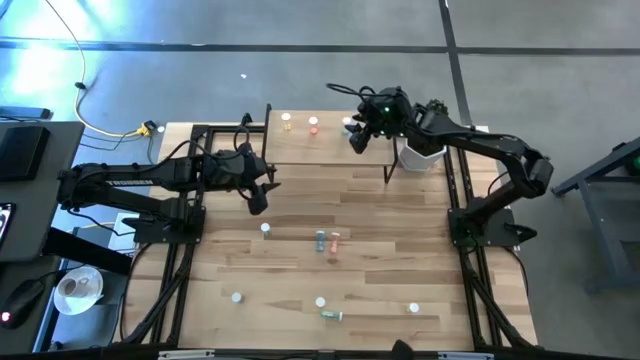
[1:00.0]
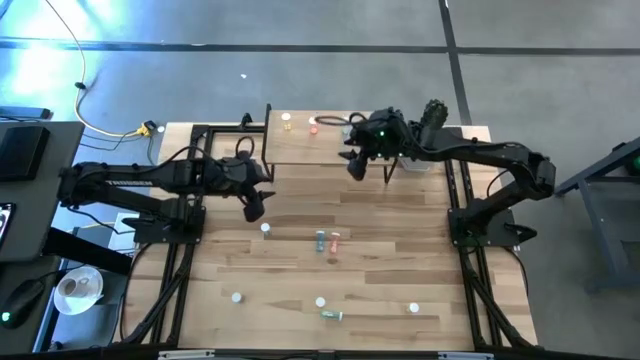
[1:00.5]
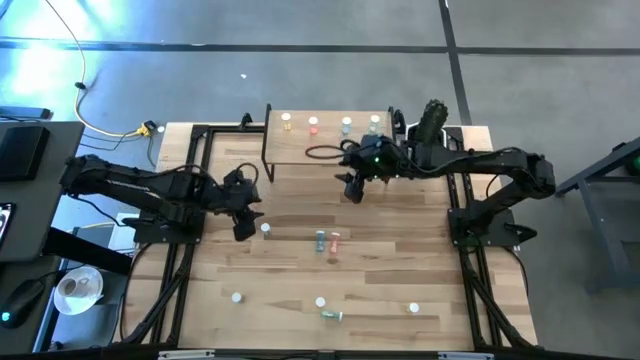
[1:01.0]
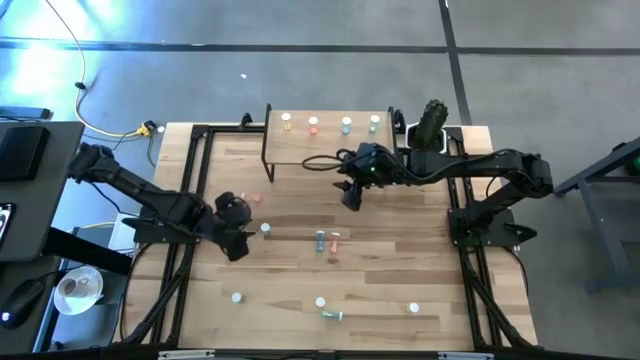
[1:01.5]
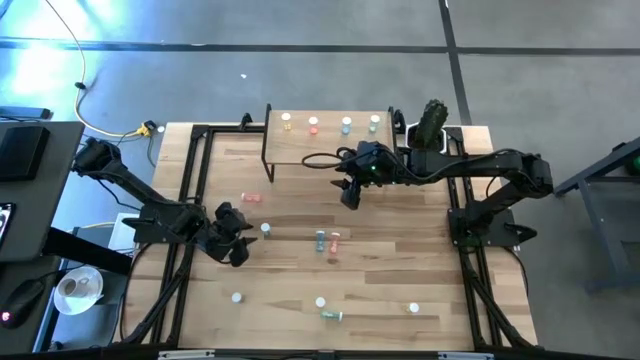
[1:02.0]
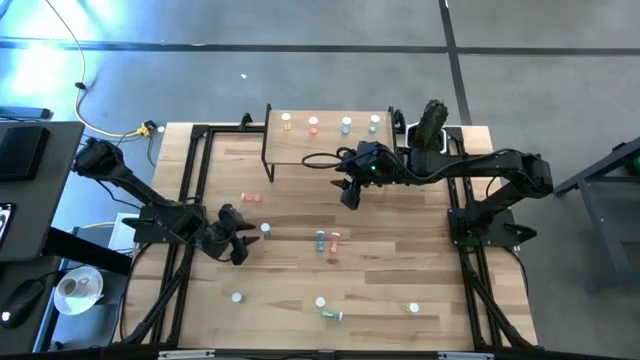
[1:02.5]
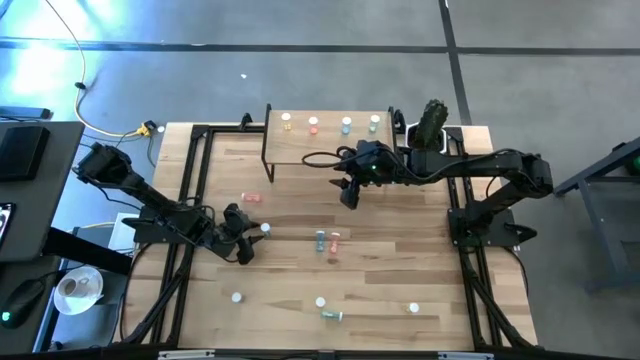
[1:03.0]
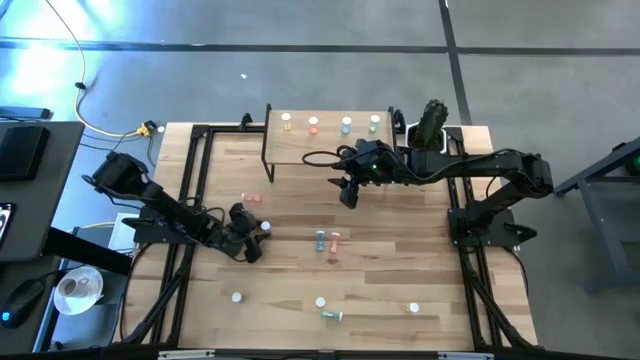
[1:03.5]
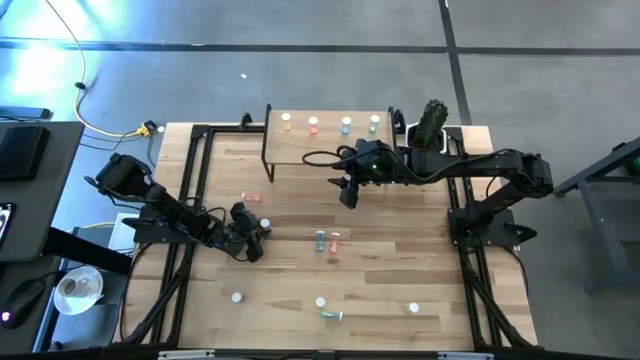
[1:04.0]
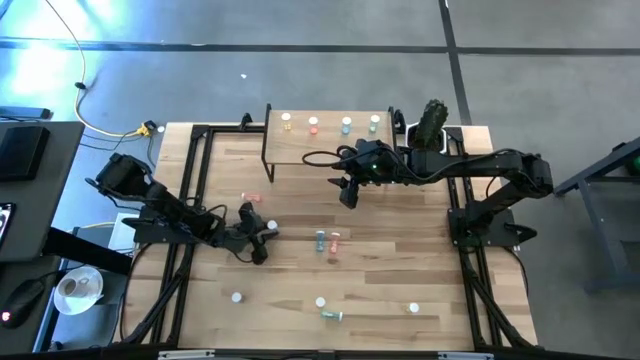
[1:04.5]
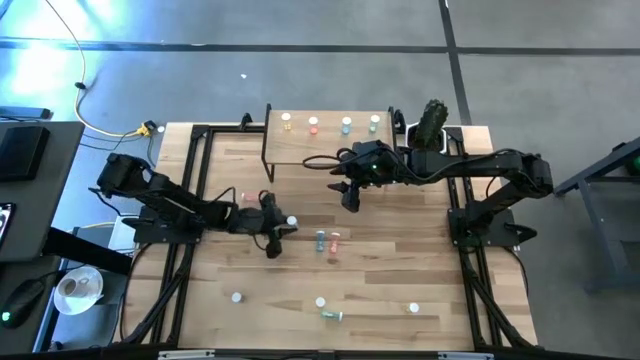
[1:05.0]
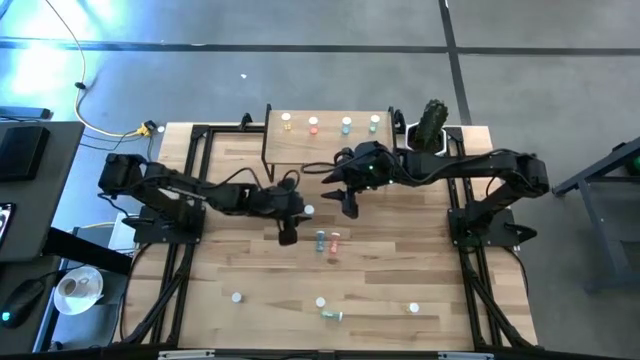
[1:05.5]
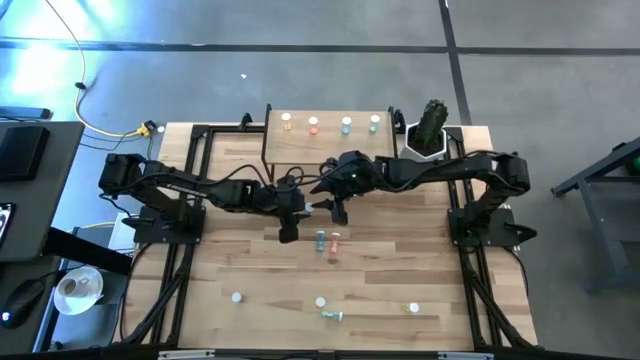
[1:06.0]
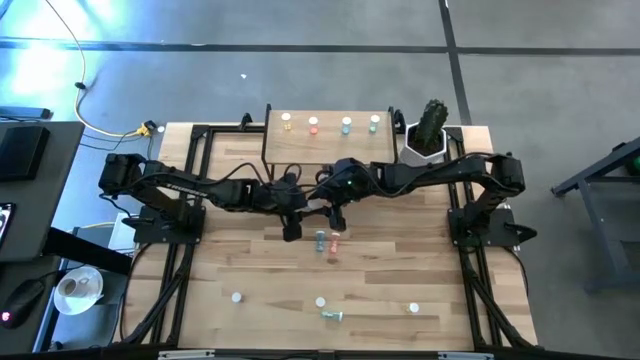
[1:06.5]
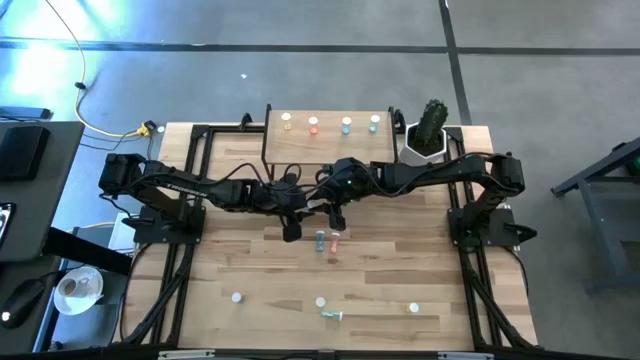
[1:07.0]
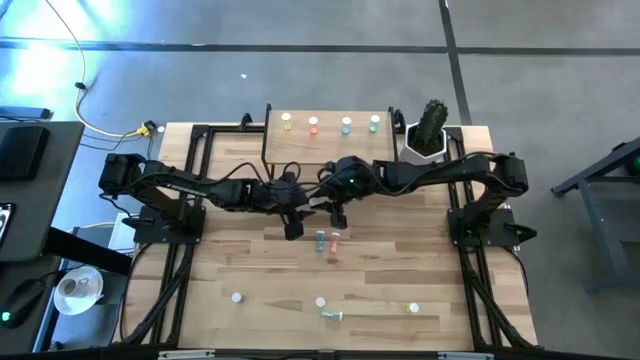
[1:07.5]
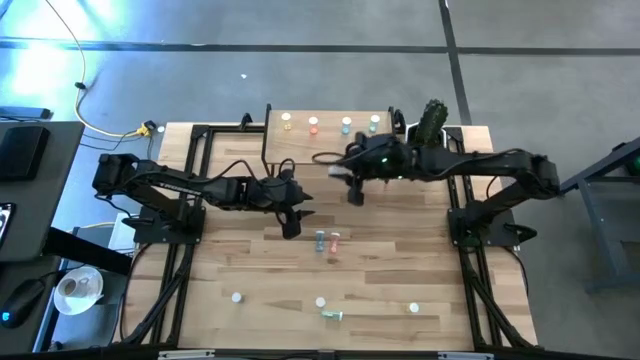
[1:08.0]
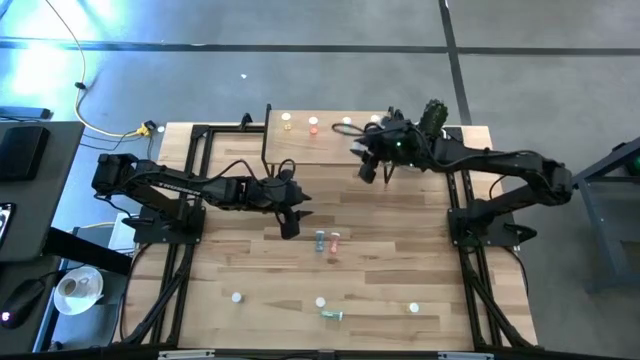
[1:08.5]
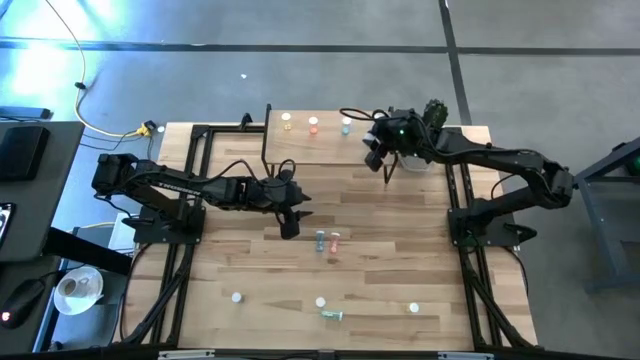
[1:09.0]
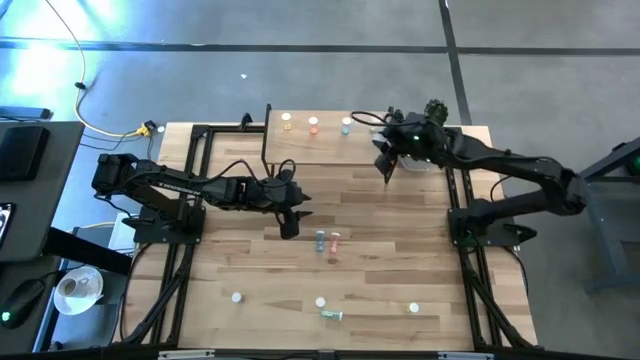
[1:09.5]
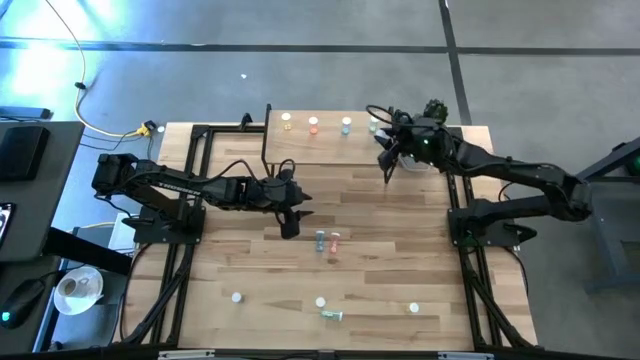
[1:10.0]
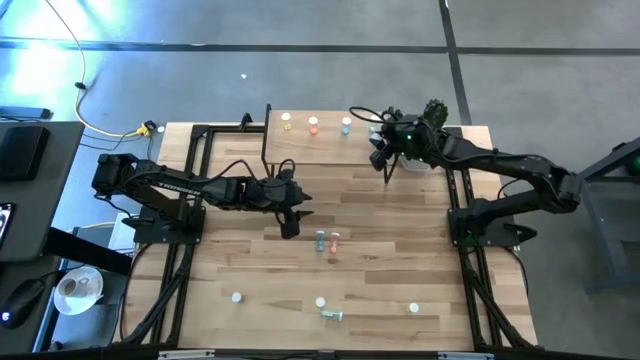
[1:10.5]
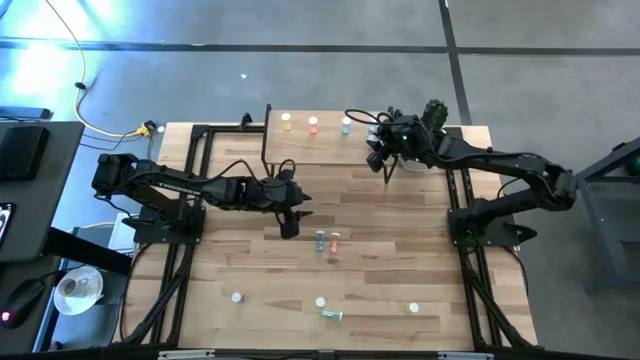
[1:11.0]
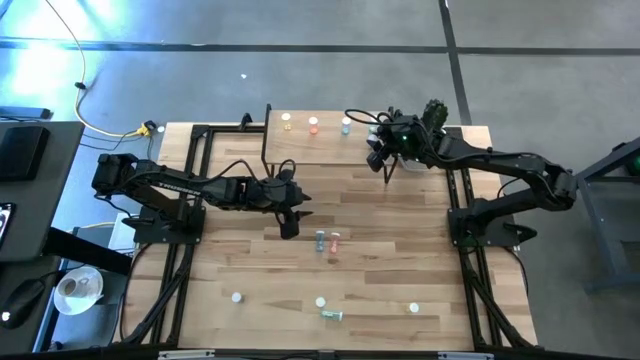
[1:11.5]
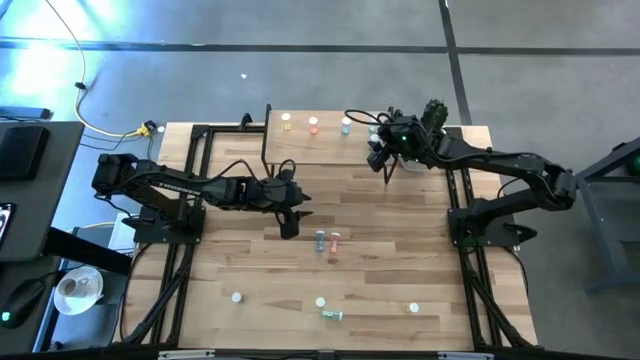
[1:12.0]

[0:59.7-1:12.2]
Task: Pick and place medicine bottles onto shelf by color
Put the top green pill bottle on the shelf aligned with the other green pill bottle

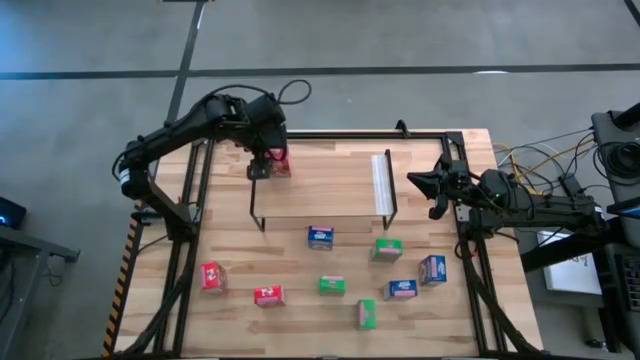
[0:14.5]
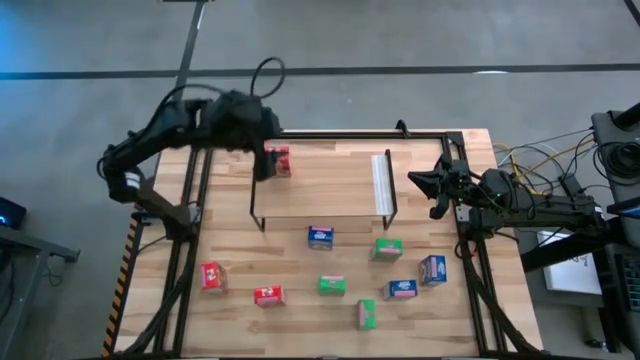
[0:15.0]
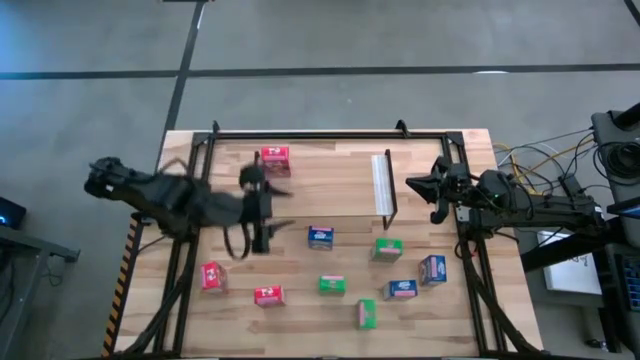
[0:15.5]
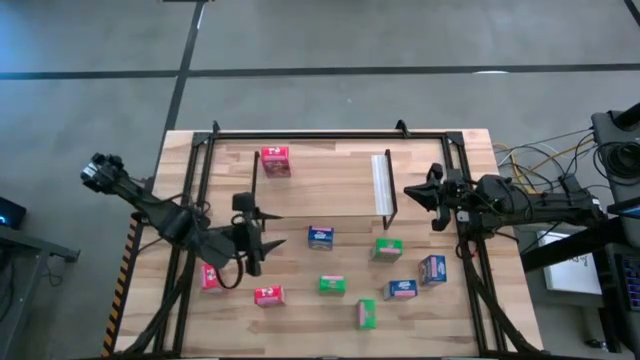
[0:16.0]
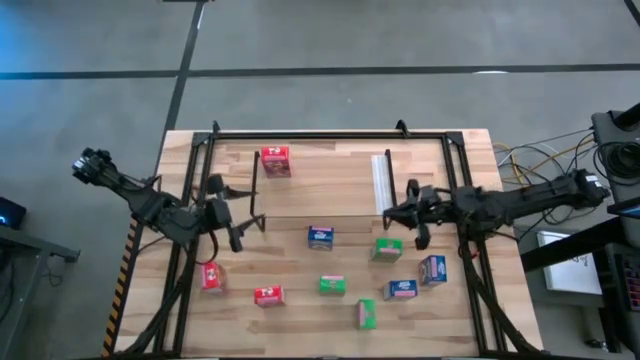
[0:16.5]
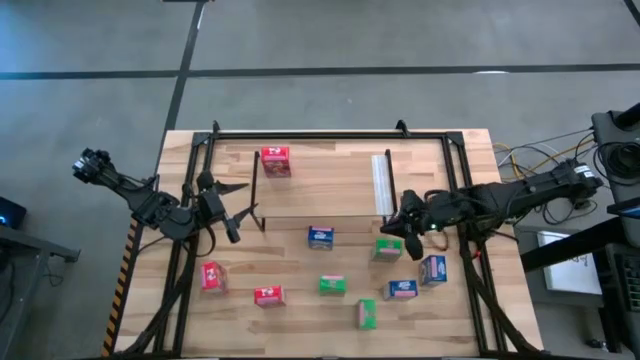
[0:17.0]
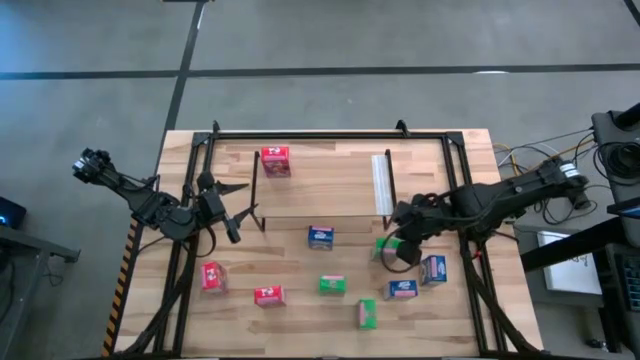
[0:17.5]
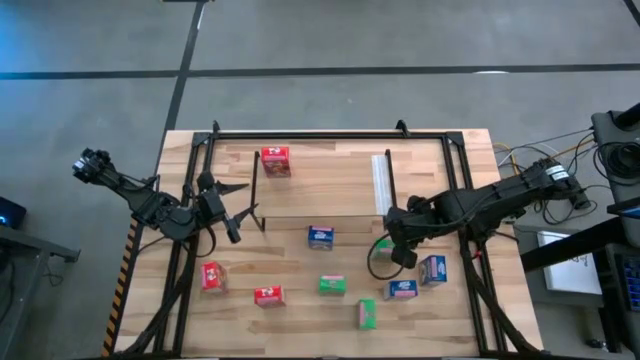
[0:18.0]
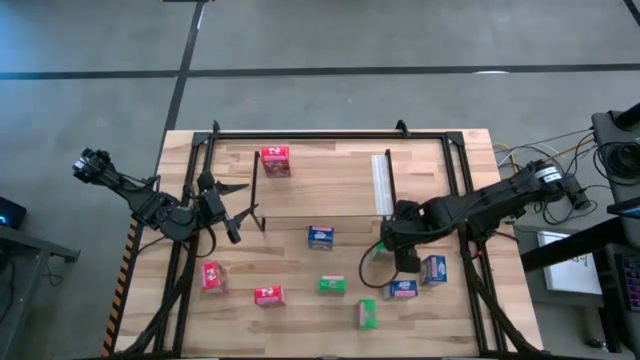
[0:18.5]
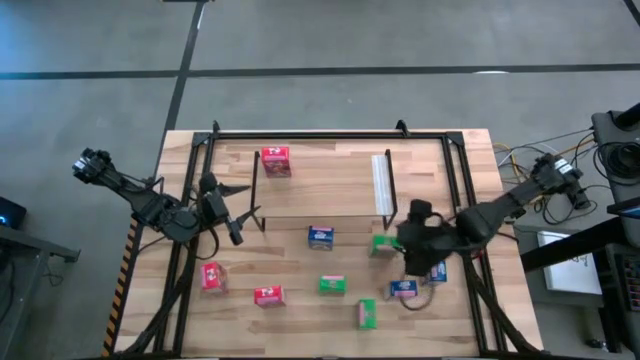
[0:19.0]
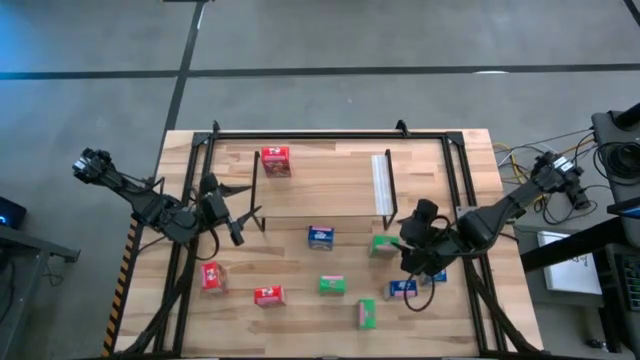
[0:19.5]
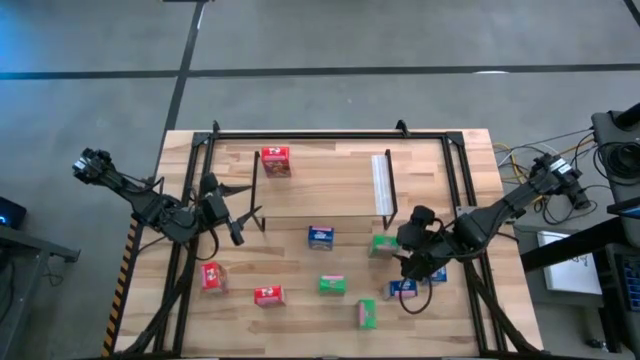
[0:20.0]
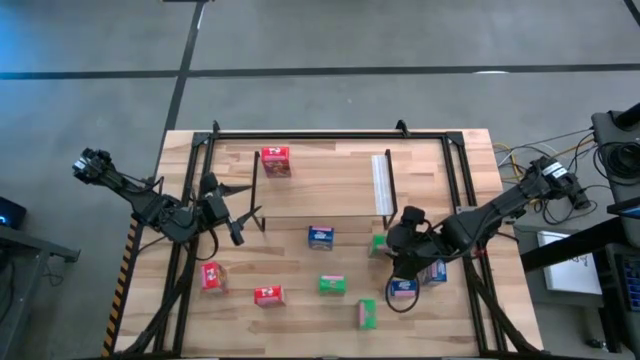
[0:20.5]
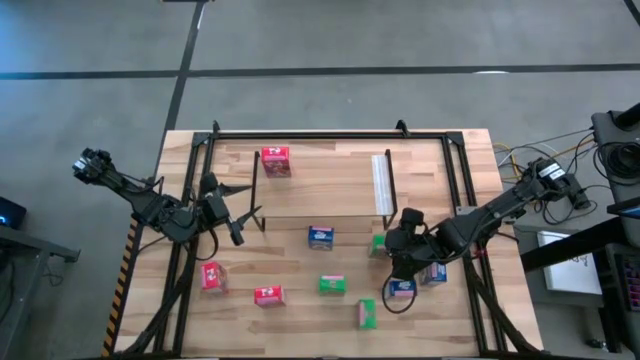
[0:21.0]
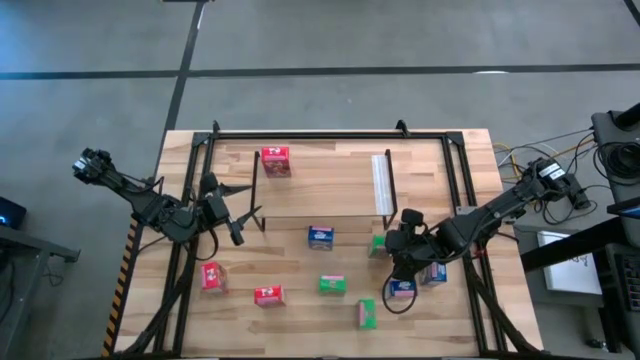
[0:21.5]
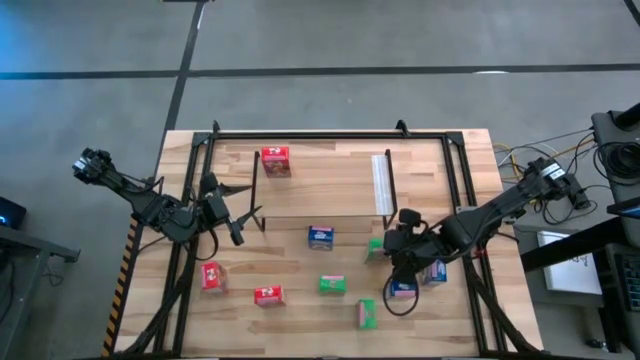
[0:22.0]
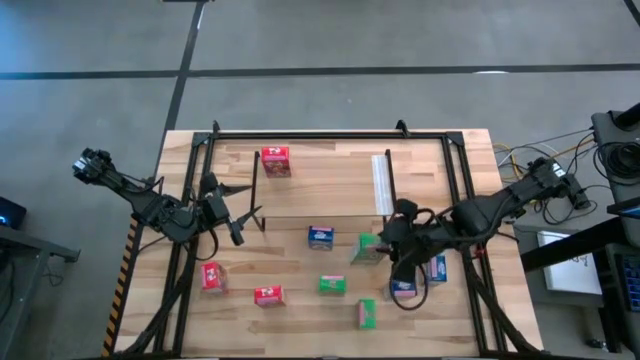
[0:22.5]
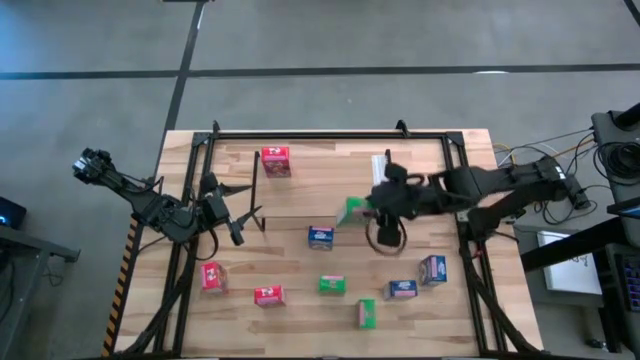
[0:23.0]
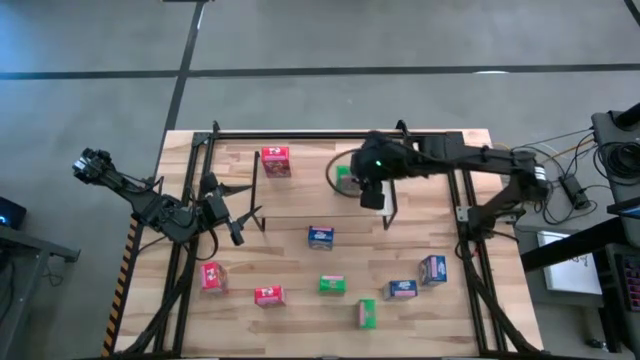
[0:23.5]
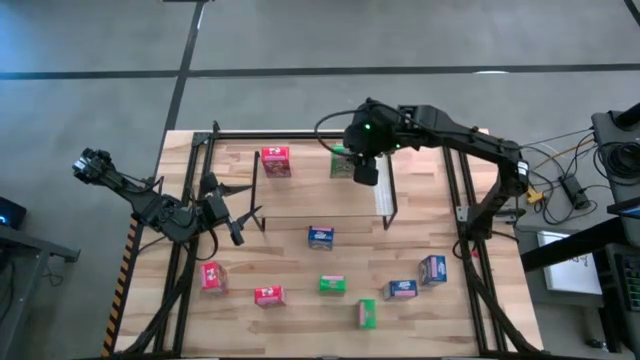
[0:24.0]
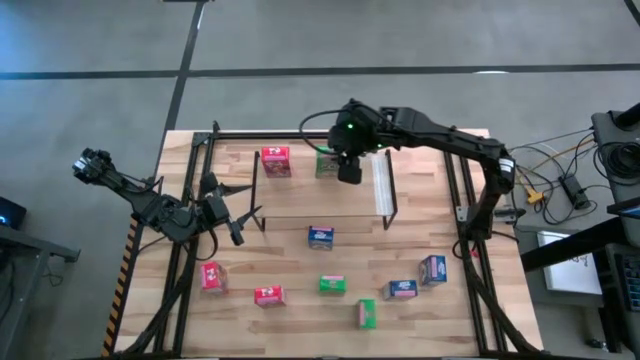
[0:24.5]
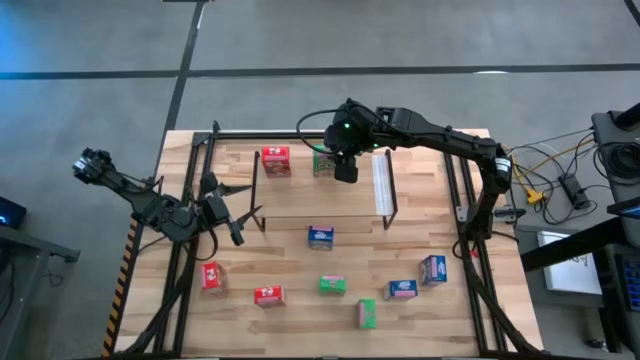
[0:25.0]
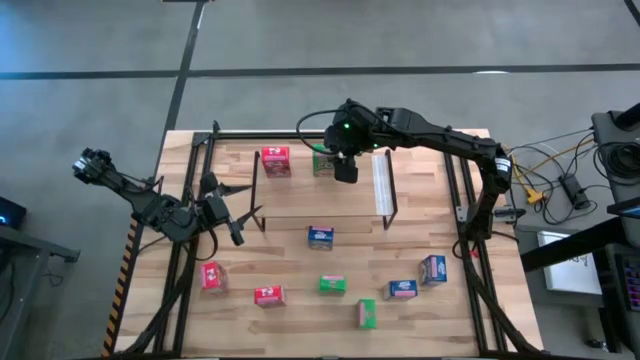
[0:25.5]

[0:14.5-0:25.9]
Task: Stack cereal on shelf
Put the top right green cereal box on the shelf
